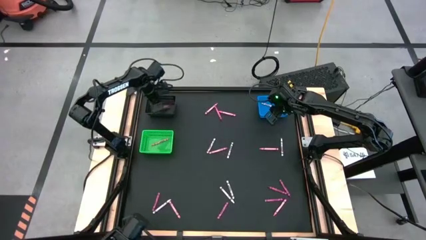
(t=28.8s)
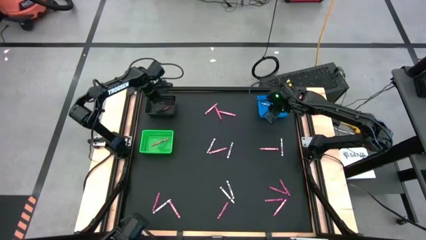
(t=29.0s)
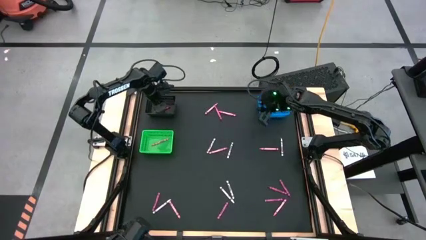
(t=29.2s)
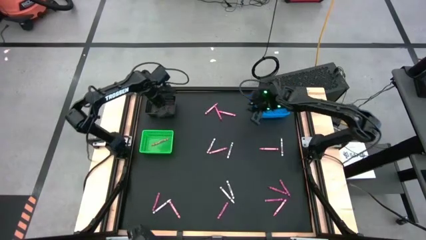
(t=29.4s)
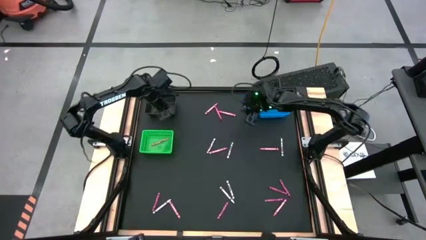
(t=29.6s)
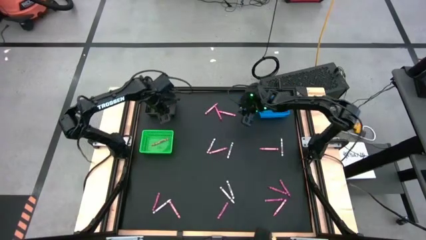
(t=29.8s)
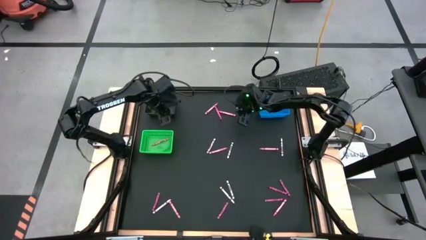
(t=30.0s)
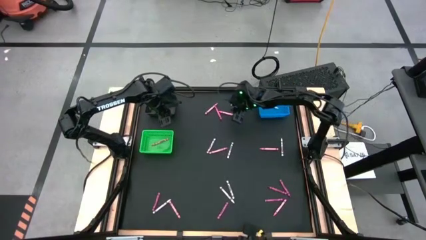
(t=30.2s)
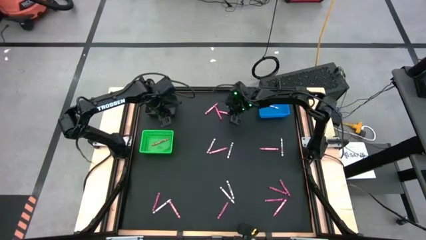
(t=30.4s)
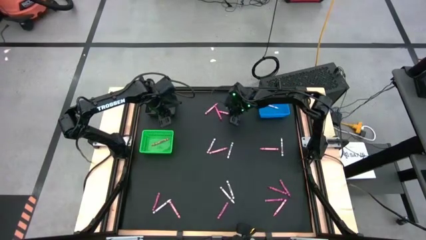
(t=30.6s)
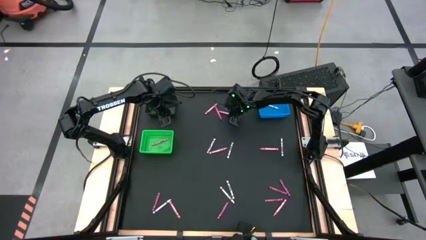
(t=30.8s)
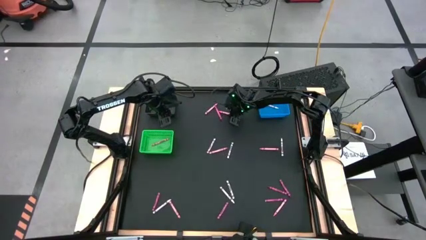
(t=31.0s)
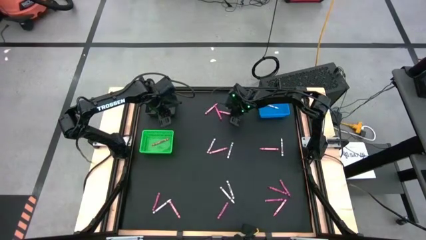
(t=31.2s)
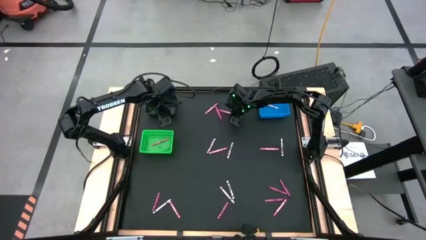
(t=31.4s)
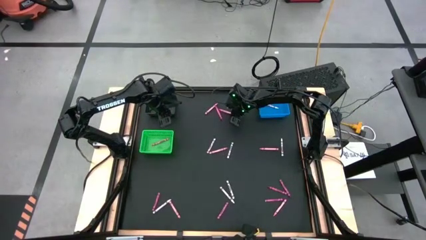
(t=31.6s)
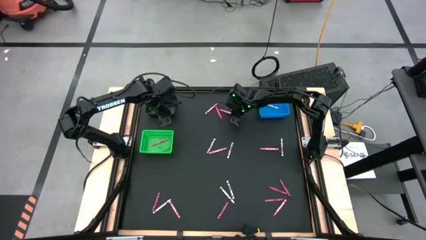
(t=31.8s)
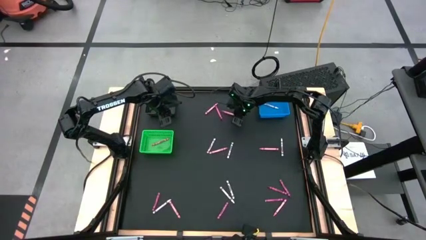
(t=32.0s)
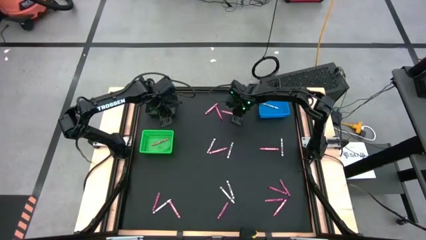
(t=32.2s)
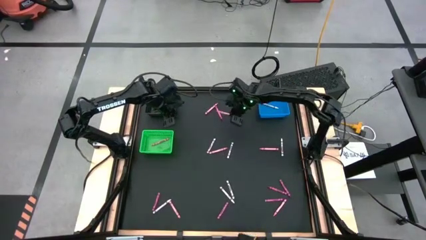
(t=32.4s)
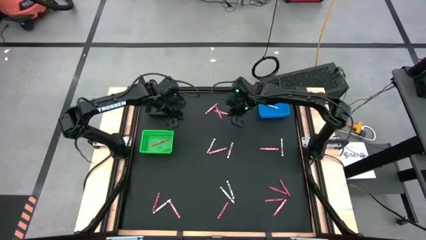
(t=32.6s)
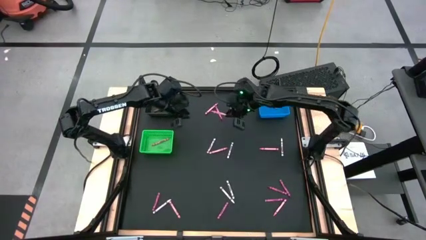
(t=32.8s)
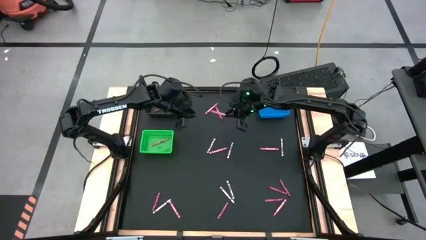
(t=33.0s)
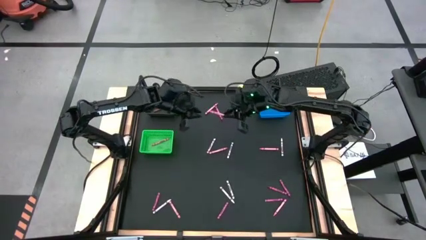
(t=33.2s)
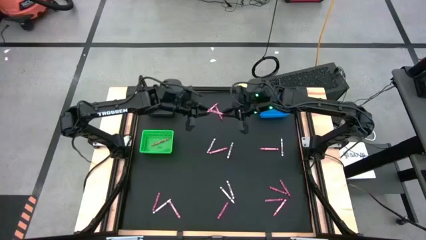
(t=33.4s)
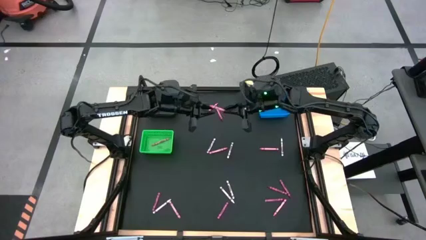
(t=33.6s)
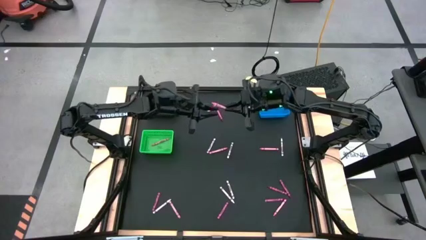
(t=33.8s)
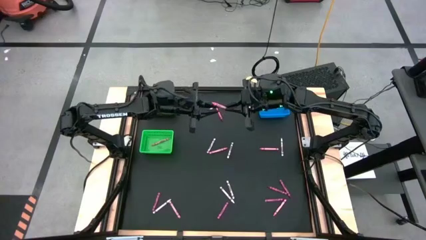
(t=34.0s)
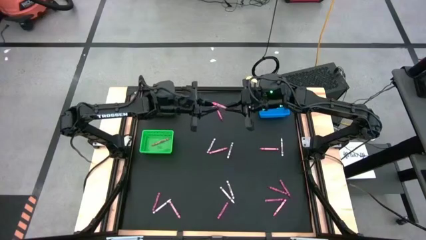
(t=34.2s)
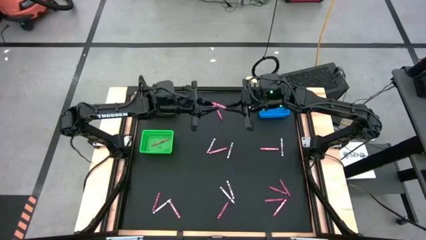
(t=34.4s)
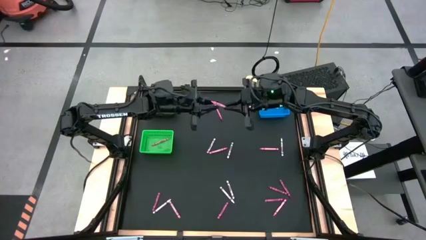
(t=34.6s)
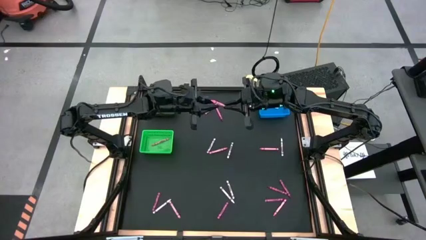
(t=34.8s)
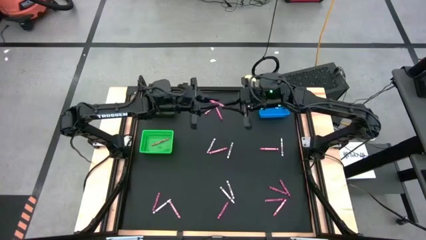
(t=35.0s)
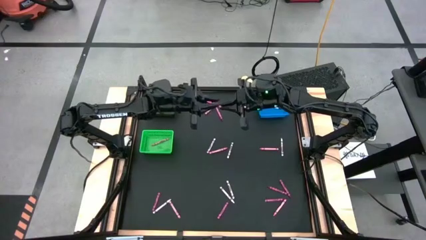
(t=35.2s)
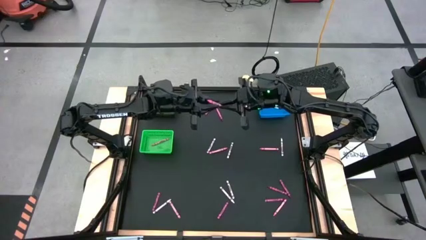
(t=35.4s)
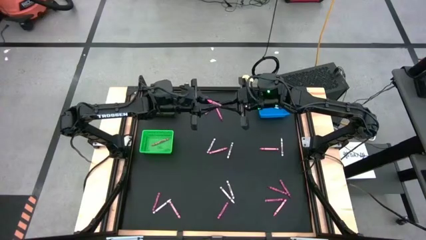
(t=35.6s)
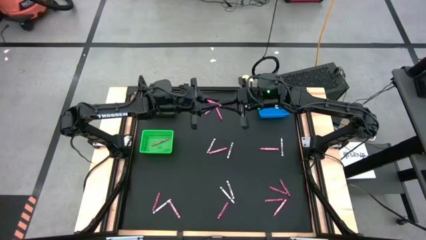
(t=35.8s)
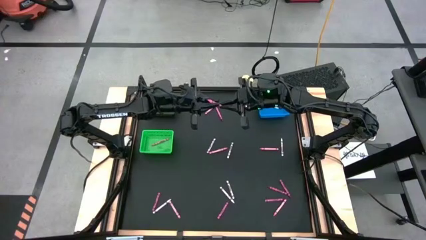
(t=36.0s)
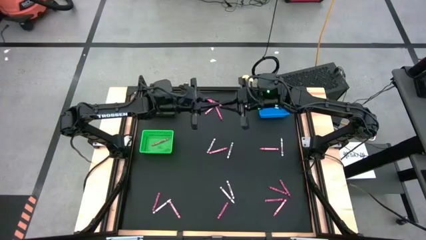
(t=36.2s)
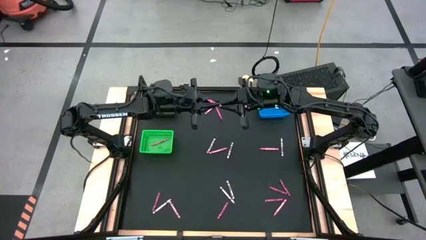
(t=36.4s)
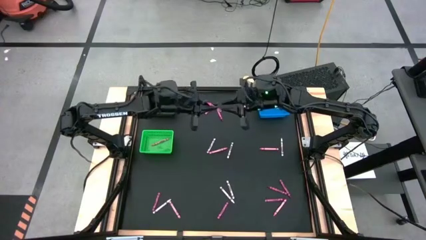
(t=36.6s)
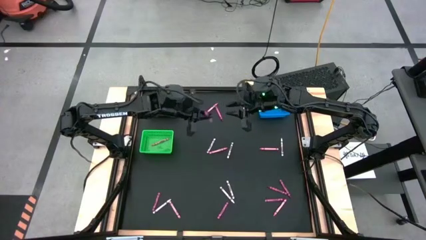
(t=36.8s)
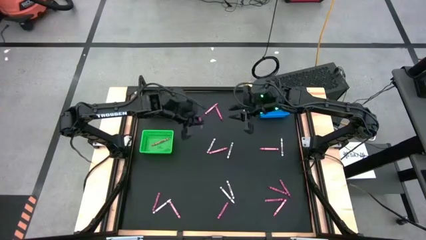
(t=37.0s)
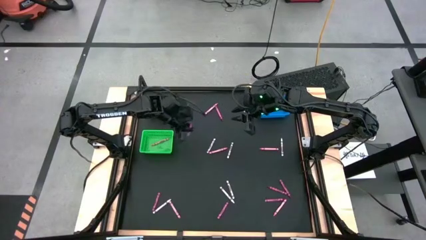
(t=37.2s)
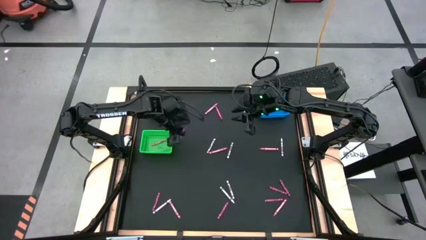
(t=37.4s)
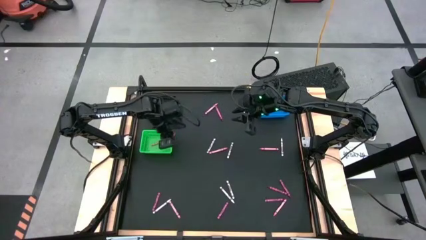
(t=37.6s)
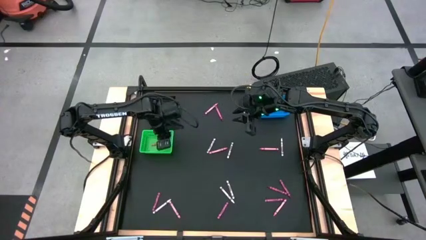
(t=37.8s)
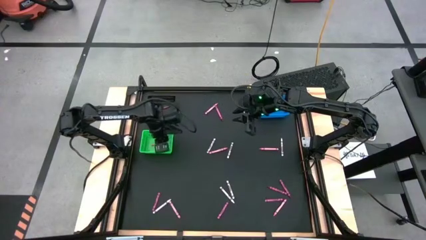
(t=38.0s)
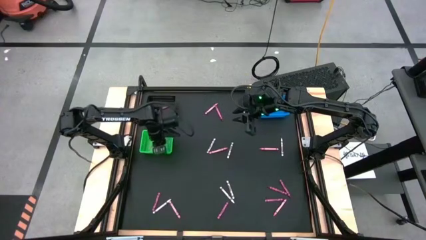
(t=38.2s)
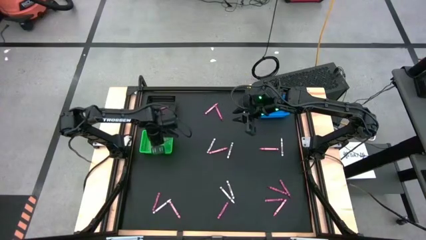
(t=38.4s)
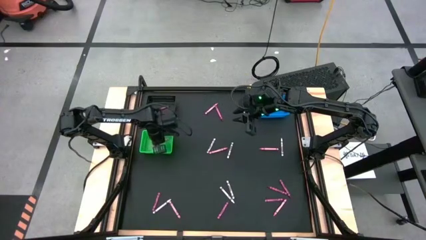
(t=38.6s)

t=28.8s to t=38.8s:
Task: Sort crayons
Put the pink crayon into the green bin

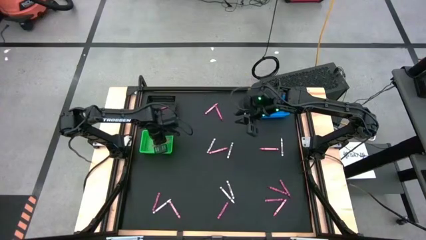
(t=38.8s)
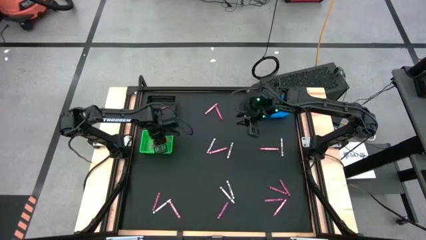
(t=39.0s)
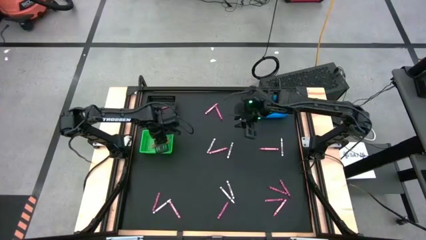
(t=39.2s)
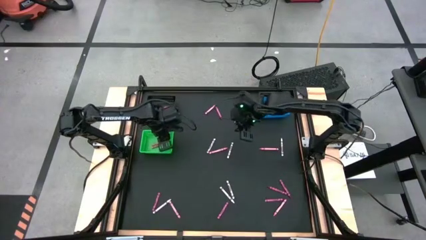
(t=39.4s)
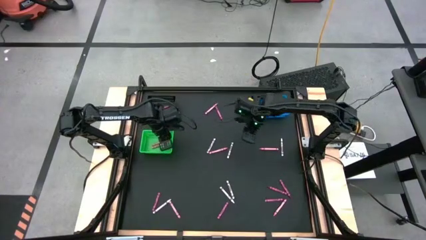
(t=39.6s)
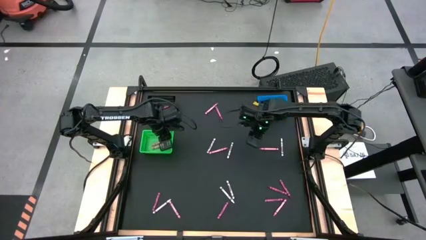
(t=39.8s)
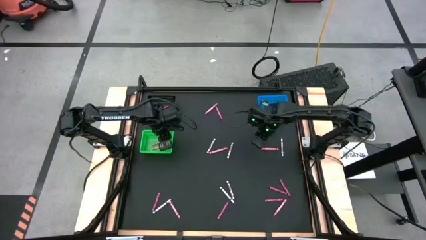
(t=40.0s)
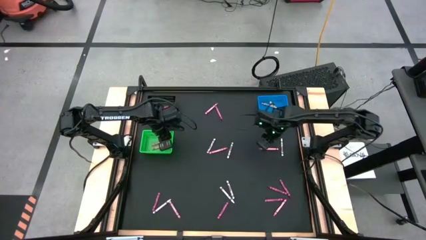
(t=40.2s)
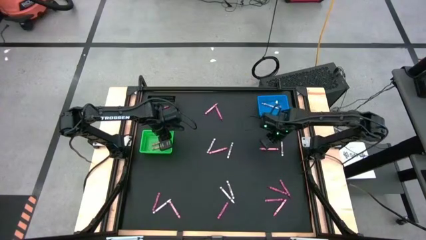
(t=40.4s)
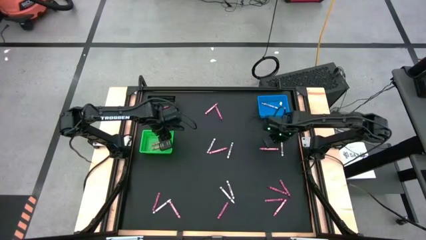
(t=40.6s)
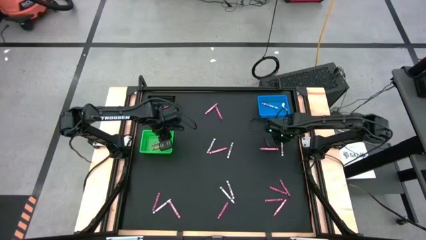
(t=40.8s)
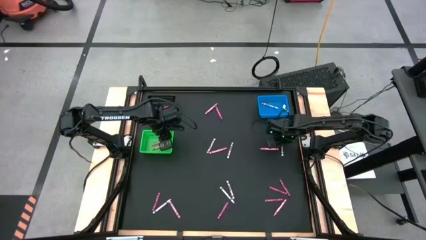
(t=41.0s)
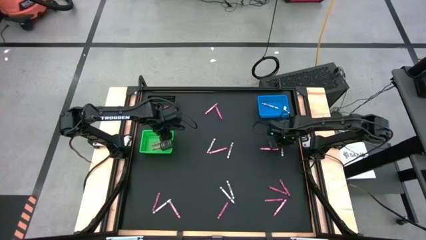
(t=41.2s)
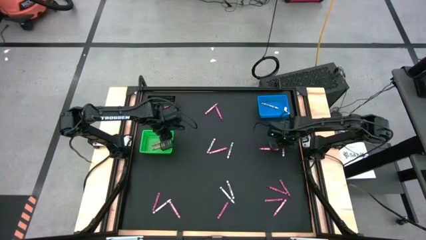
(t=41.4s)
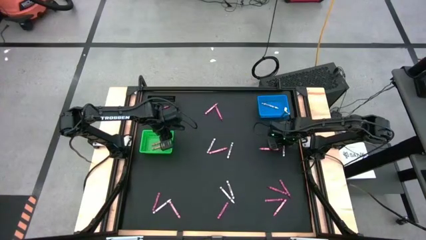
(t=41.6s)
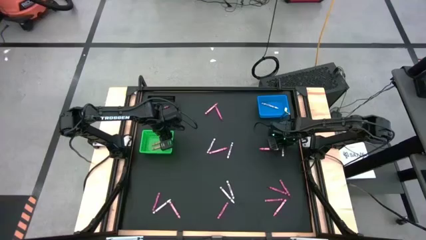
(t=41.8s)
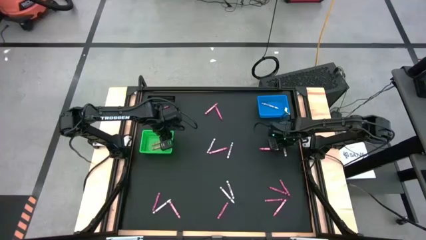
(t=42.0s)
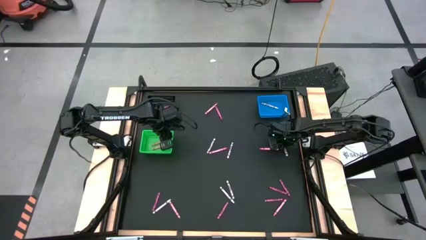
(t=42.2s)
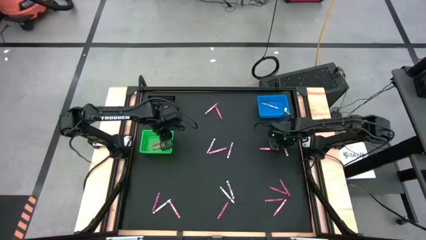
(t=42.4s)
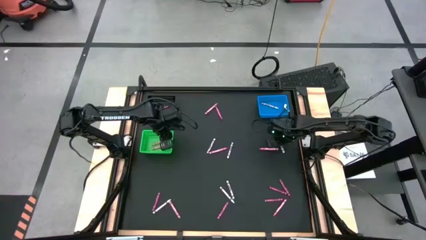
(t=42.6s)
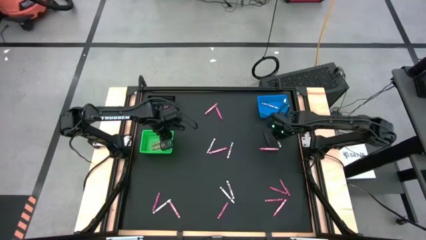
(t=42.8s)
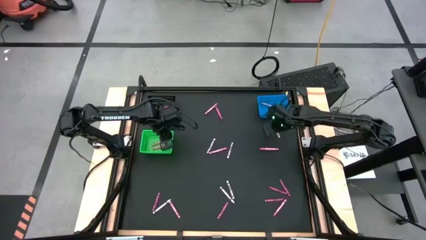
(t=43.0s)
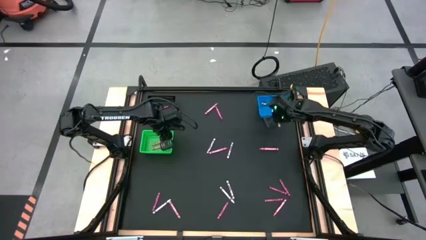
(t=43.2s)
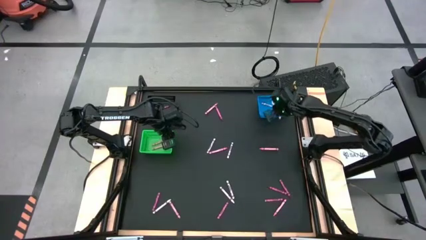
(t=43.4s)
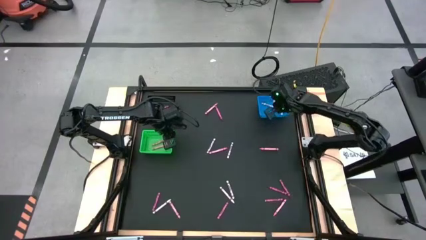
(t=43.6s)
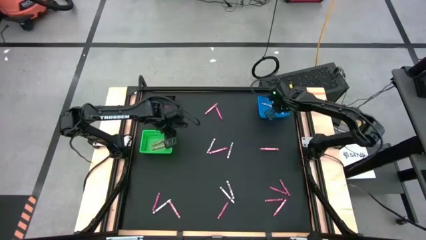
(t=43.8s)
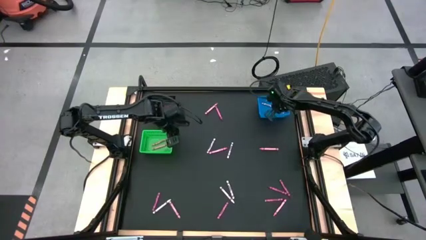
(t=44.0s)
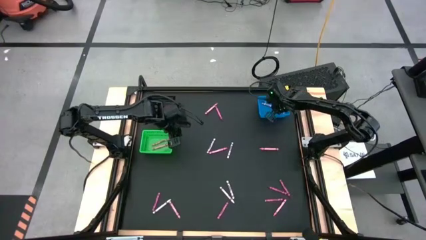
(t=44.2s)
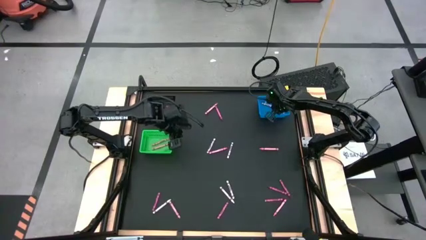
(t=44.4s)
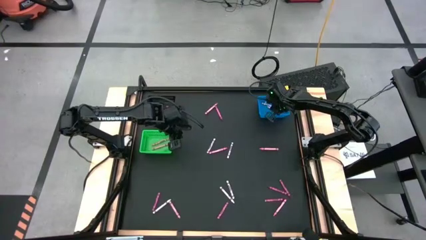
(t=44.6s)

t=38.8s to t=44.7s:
Put the white crayon into the blue bin
